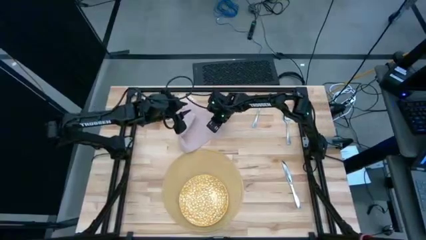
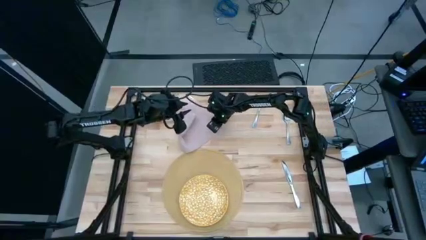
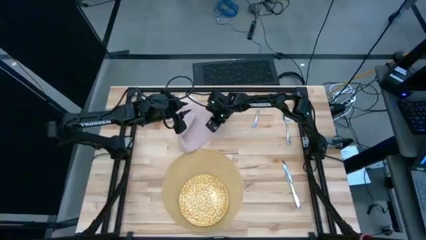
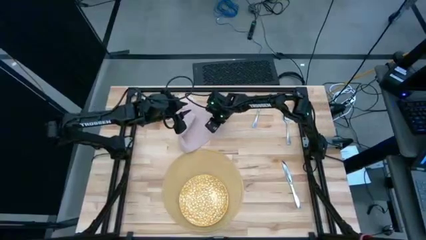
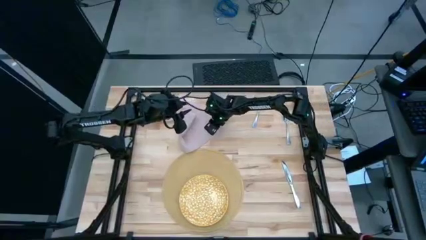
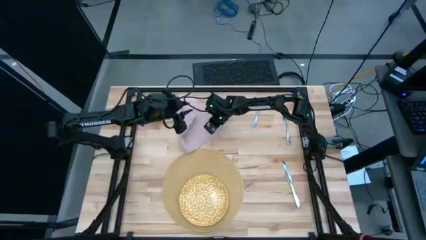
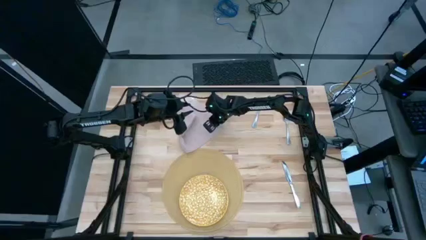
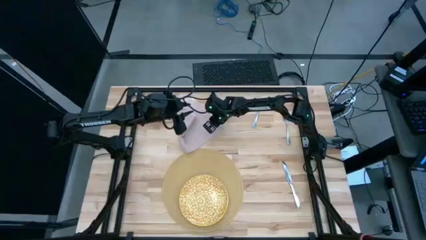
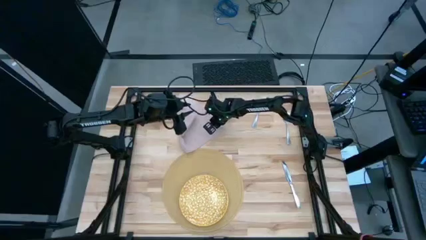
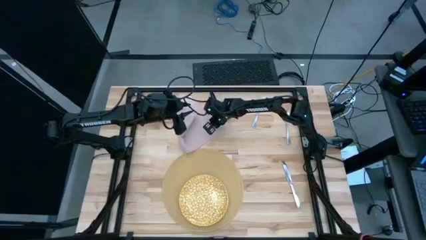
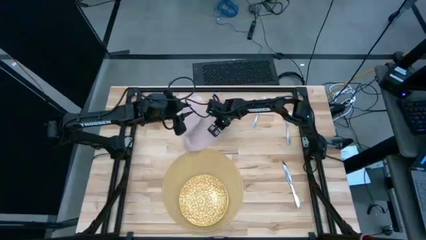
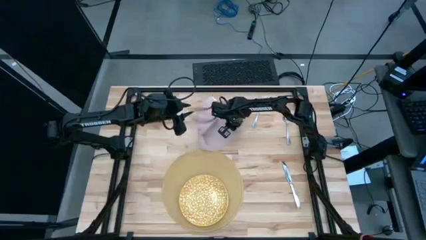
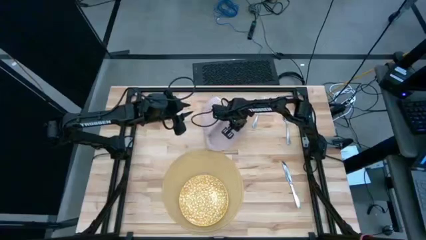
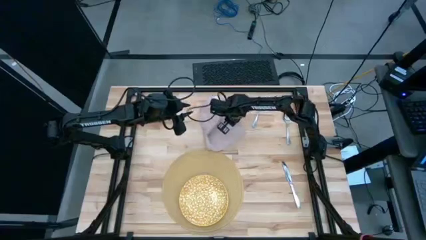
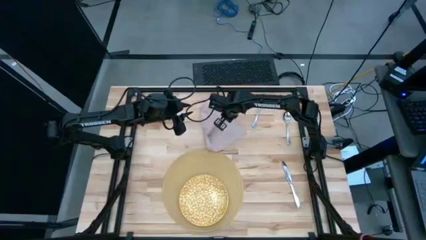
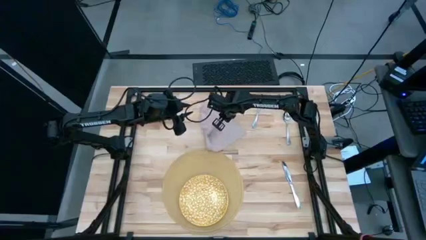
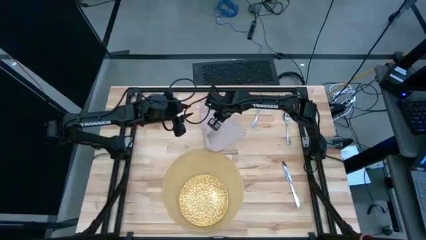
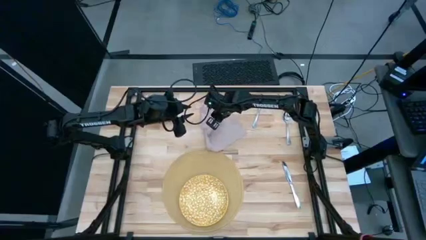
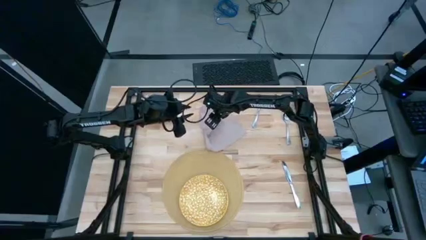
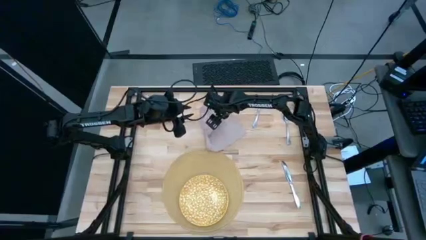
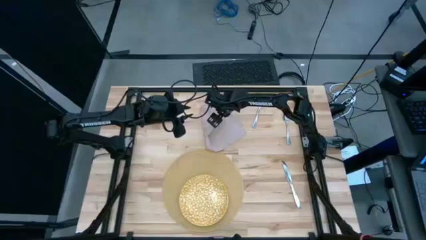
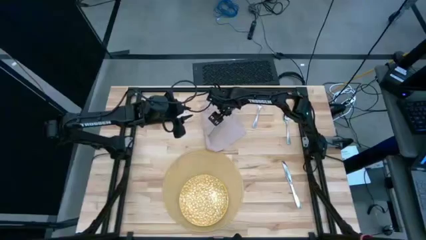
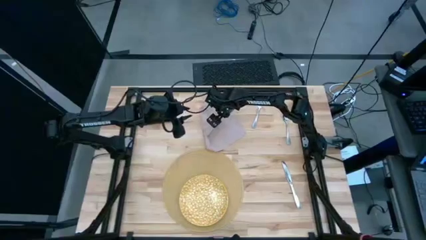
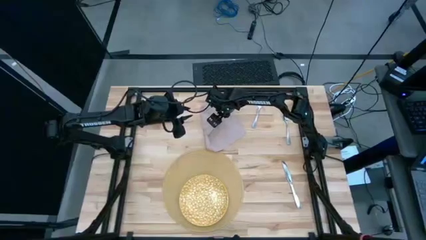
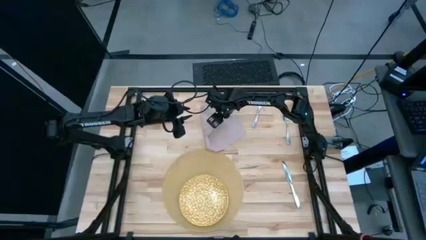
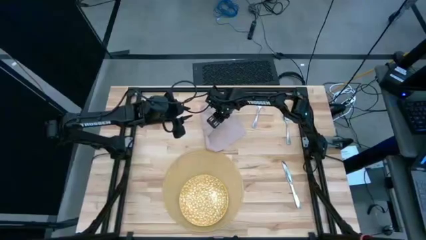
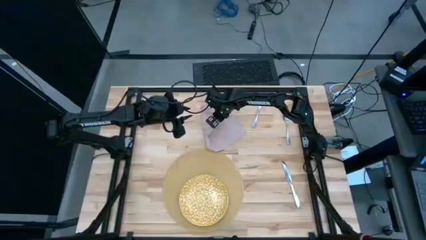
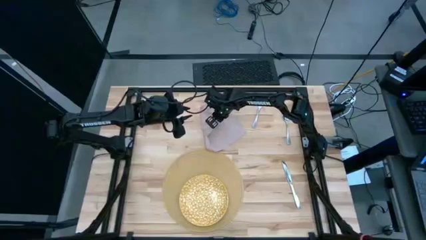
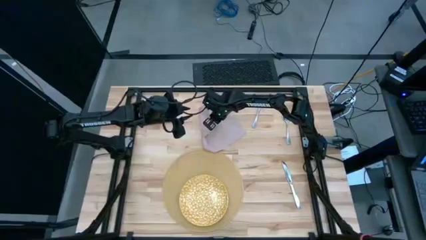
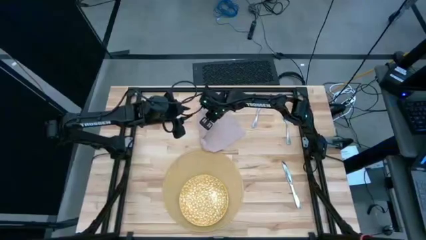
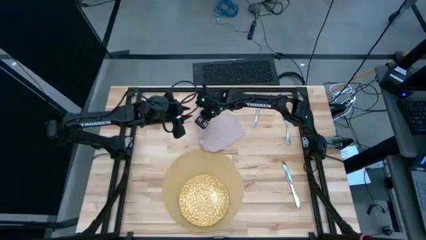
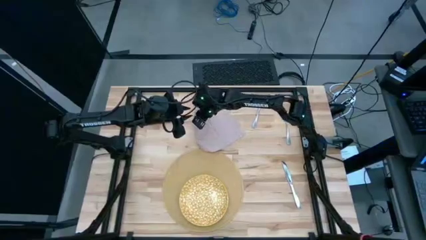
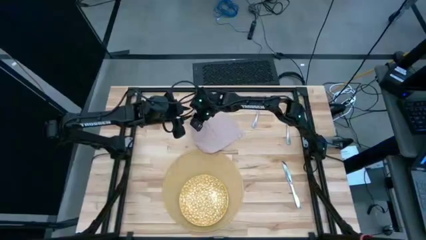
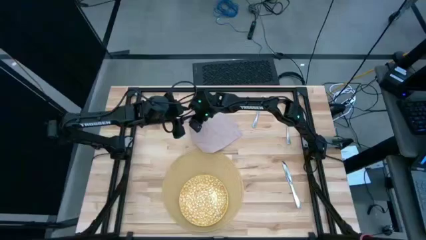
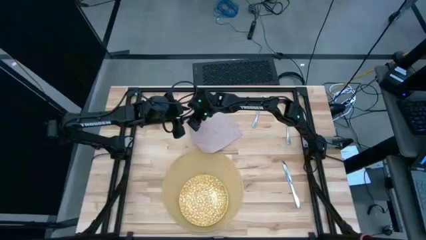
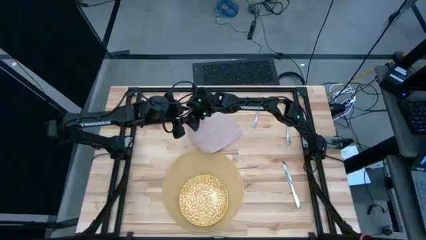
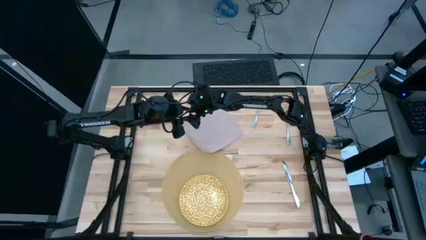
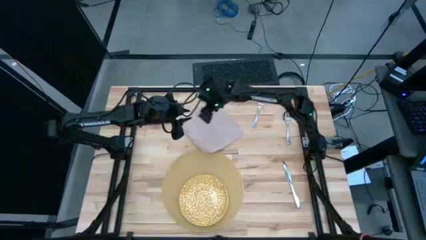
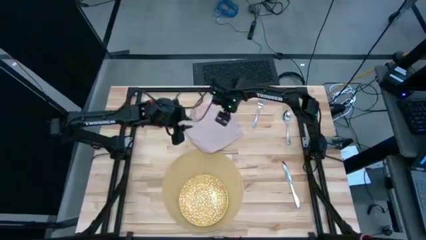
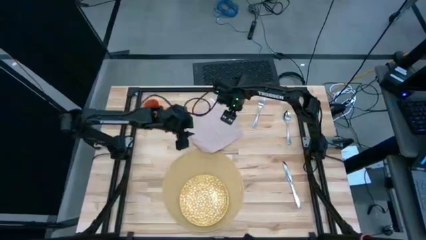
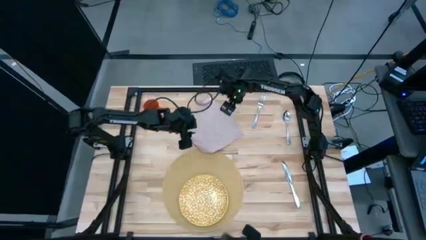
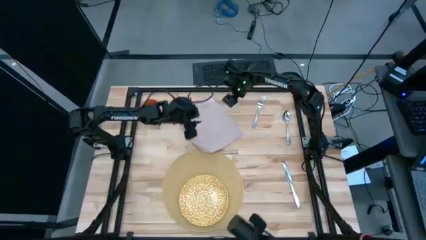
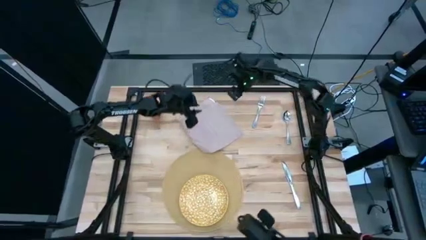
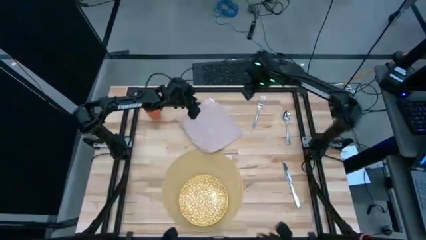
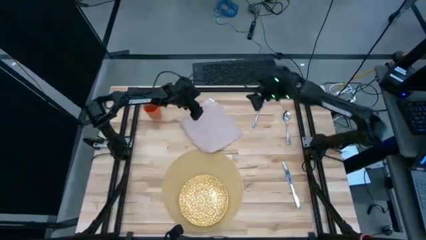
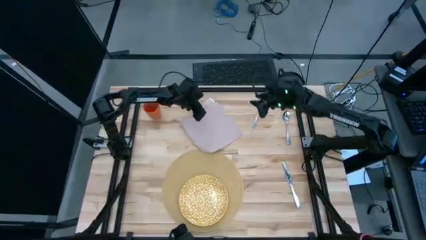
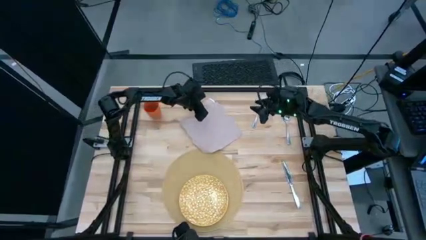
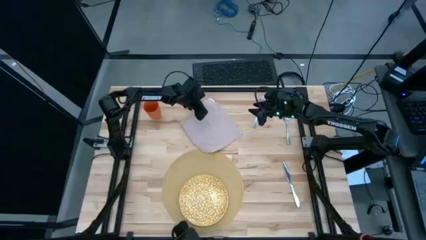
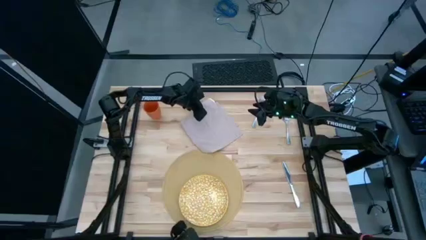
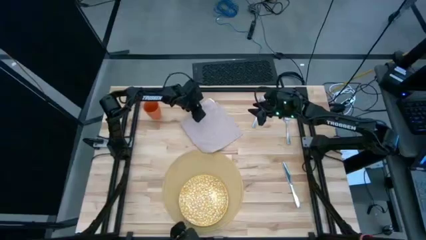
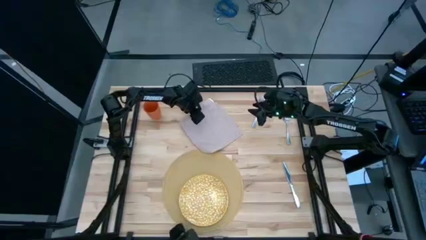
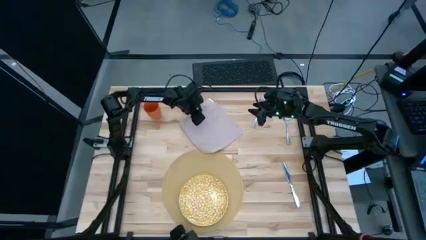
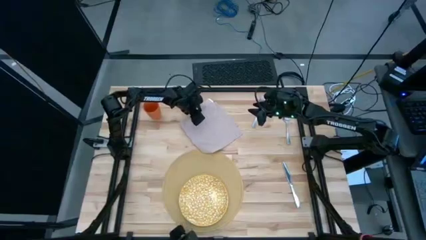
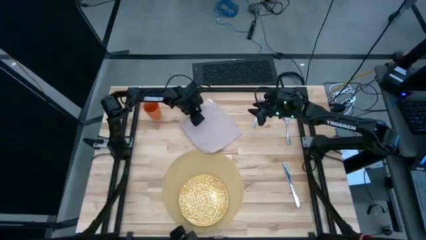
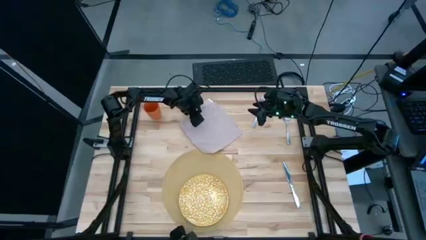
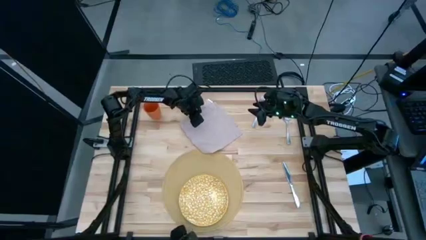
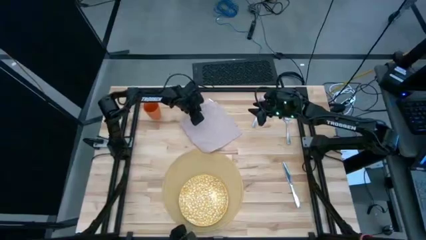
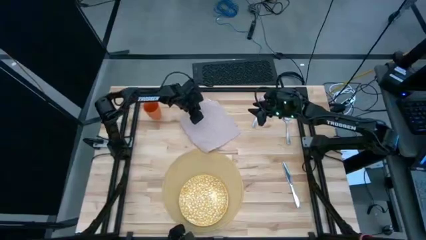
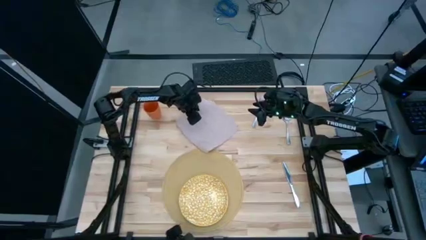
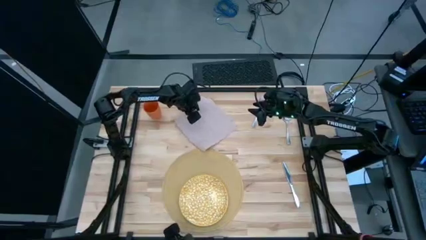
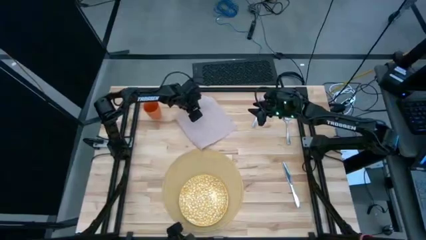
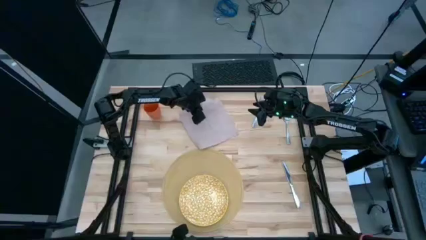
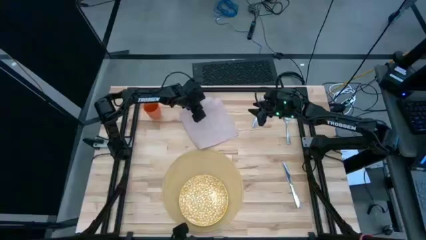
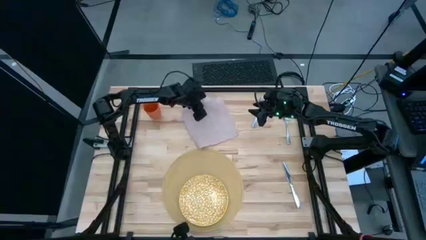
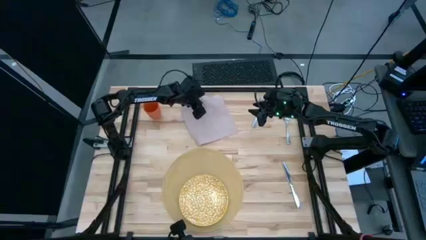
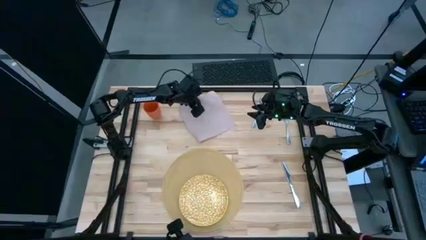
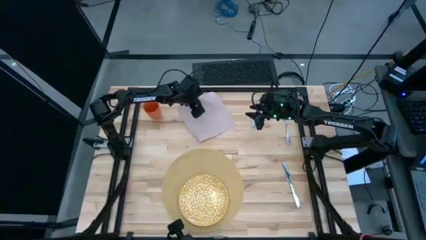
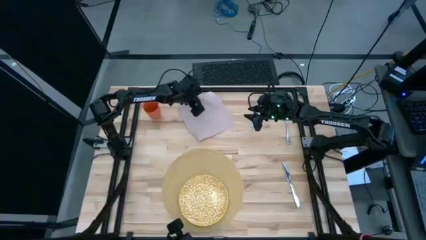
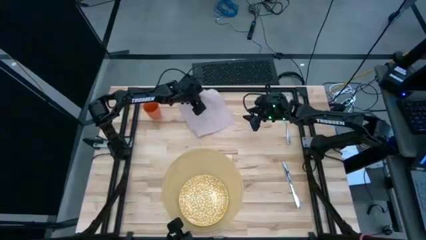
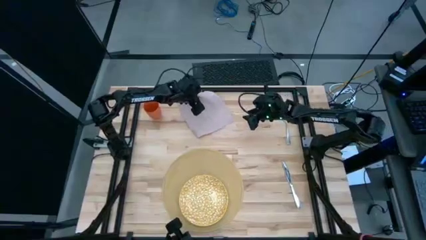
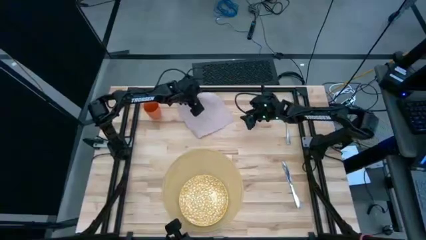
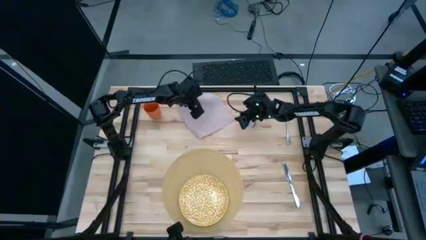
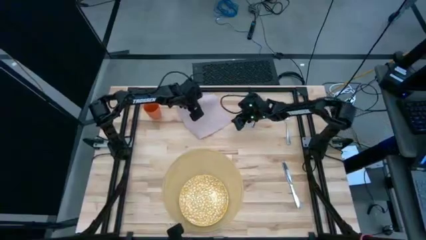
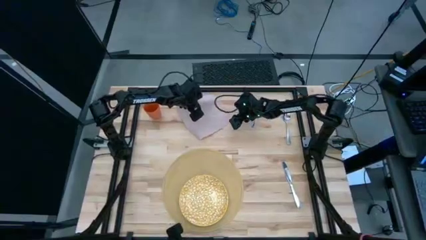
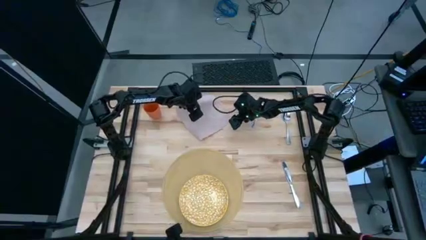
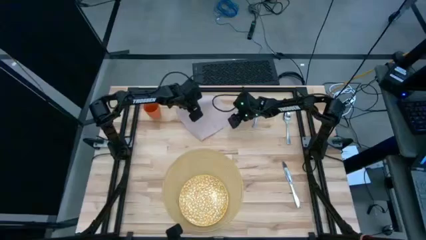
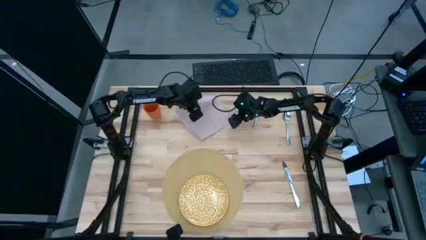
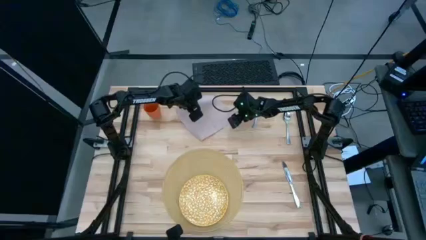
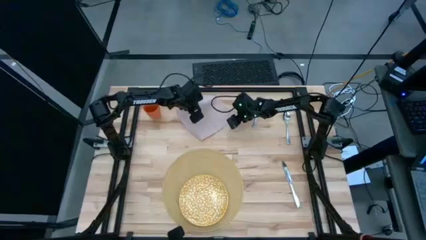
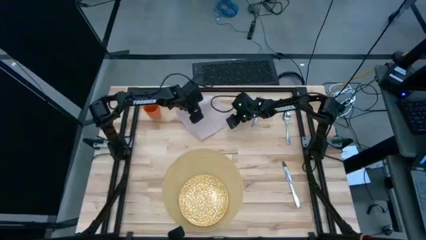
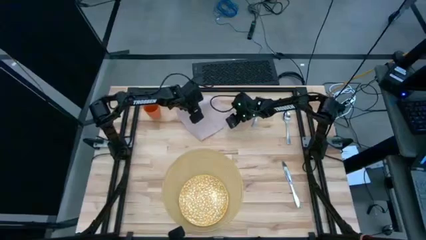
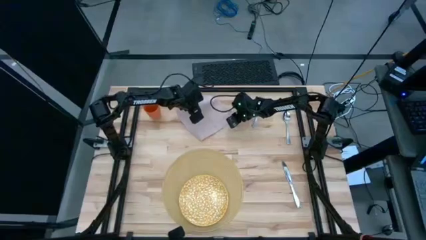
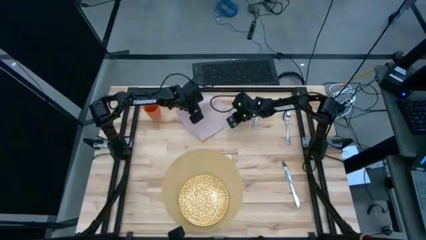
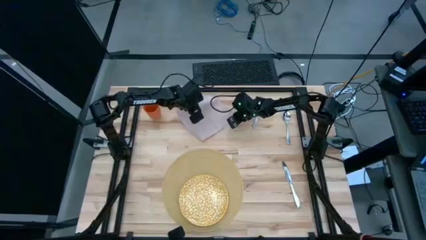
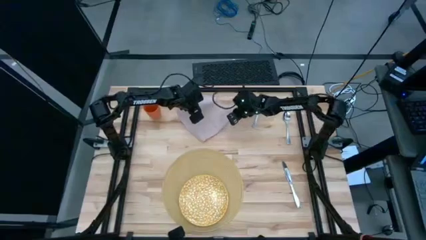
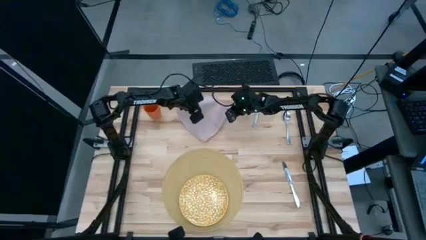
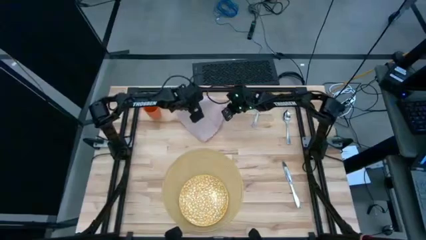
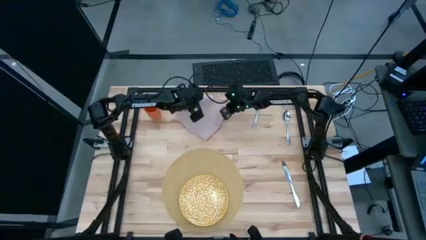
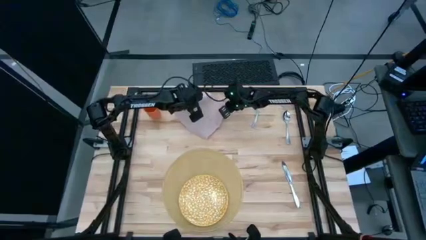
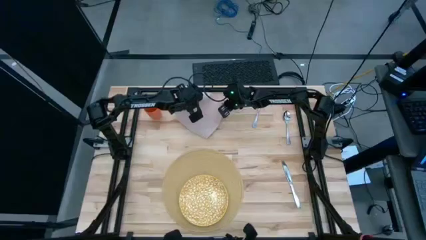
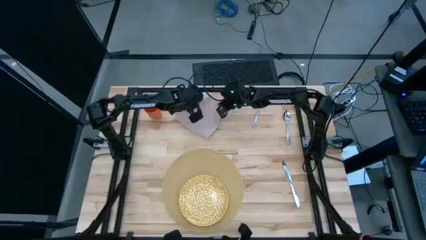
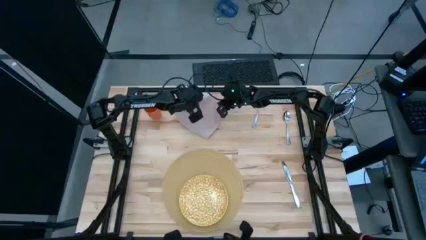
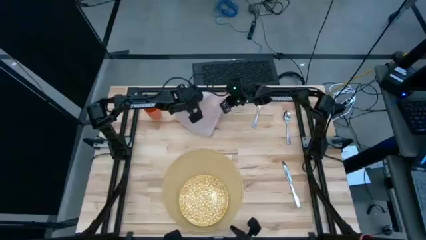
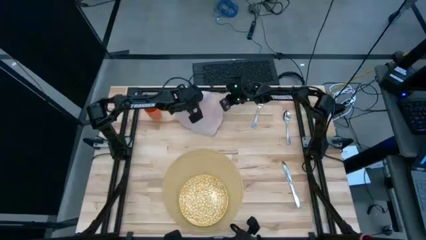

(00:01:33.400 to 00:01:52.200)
Task: Set table place
Fold the light orange napkin on the table
